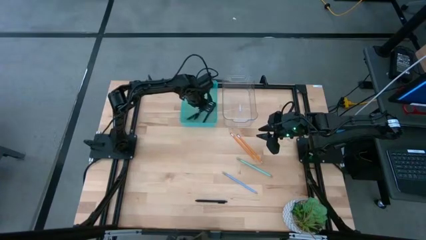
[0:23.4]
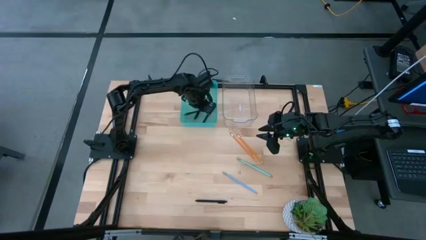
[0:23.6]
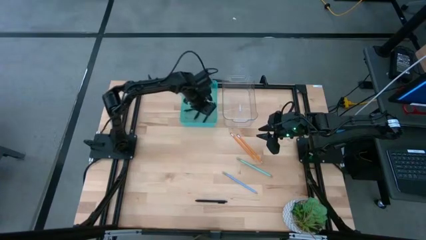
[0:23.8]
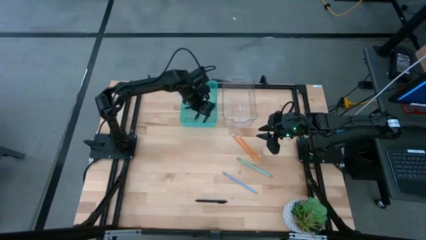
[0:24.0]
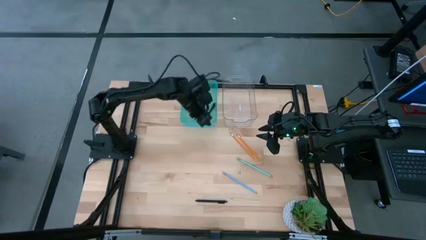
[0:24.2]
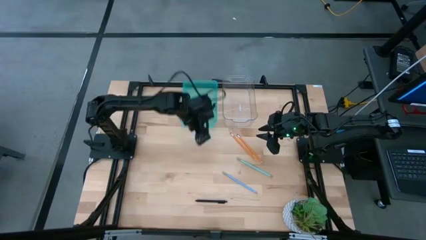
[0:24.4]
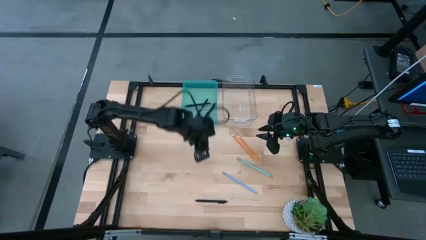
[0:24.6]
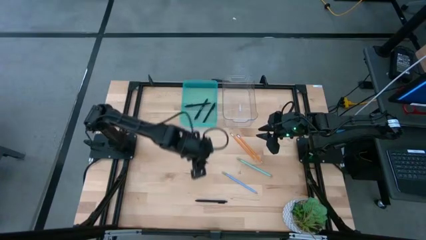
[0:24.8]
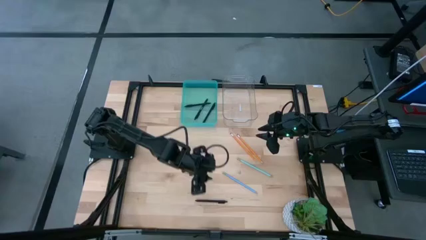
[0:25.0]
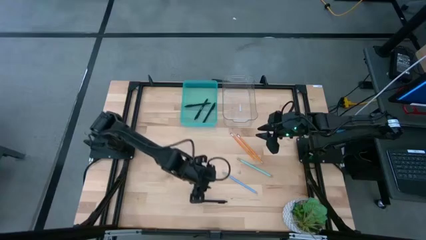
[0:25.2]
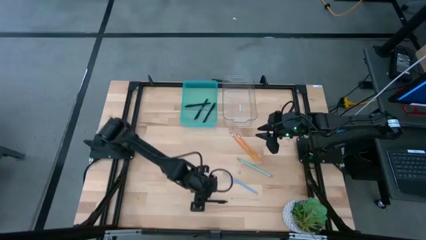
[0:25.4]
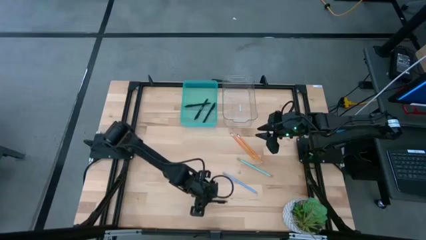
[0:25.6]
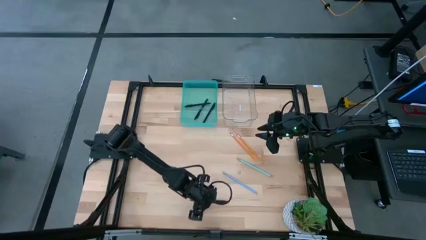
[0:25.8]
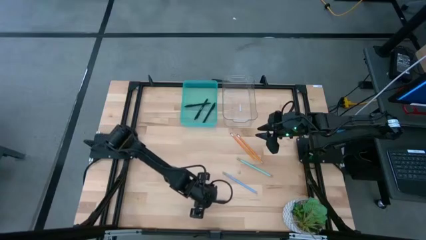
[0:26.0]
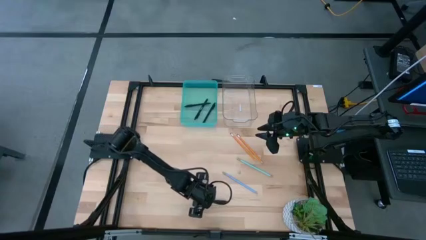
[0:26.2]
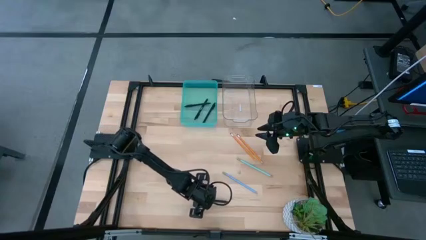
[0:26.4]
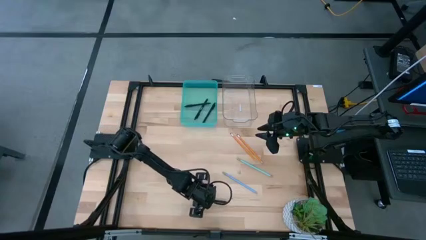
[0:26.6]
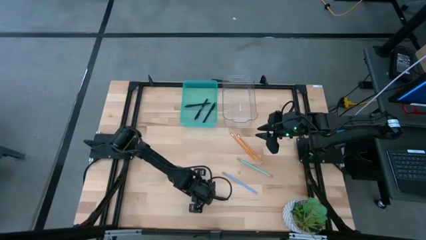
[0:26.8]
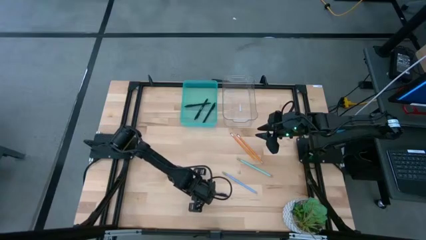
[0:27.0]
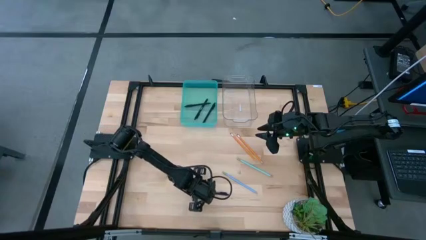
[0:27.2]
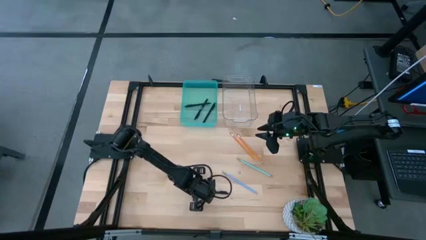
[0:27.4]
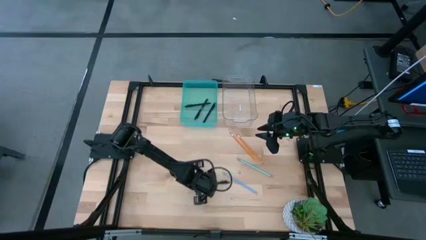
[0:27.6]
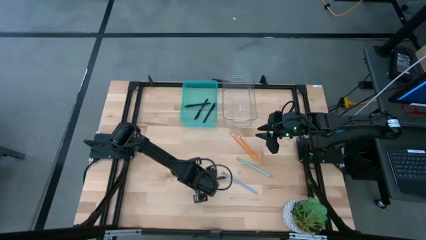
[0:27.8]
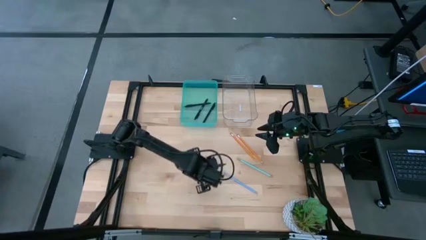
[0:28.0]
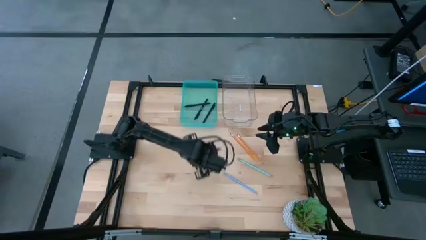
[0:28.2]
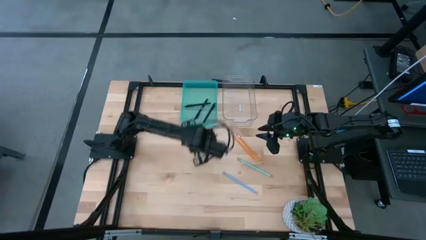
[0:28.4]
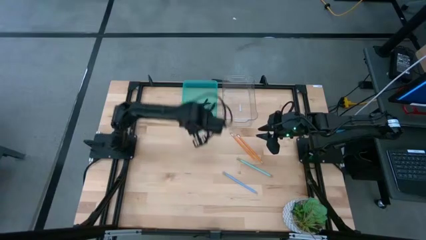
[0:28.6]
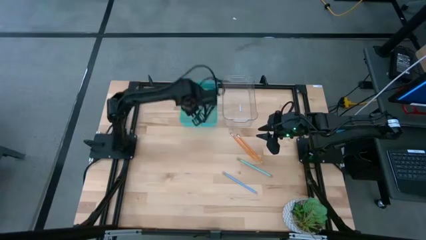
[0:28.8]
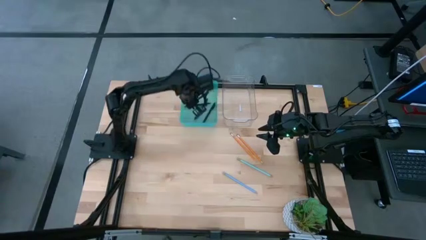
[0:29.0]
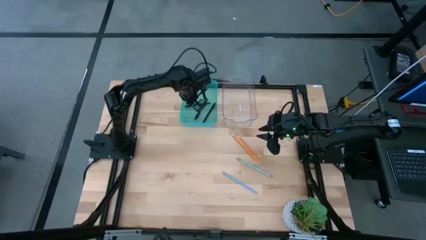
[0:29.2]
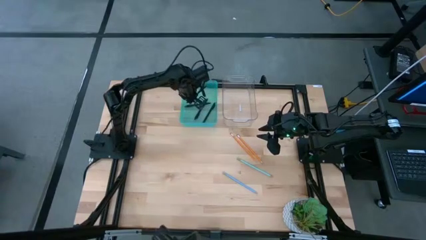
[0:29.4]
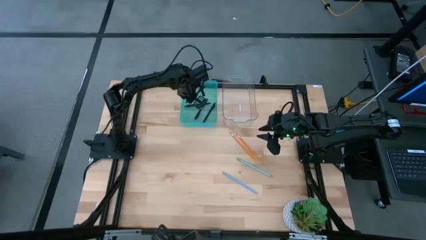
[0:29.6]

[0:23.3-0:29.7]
Task: Sort pens & pencils
Put the black pen into the light blue bin

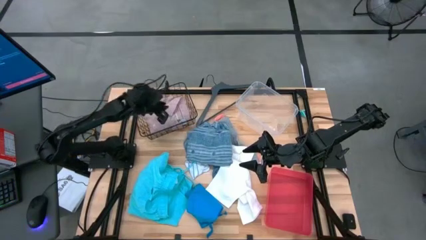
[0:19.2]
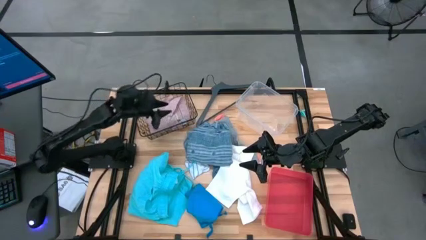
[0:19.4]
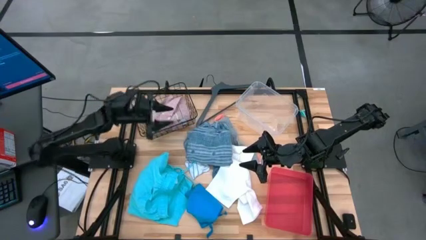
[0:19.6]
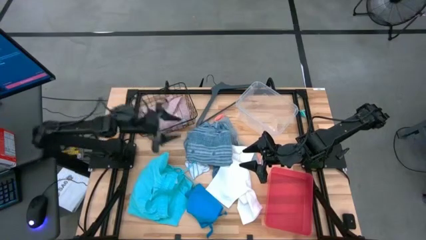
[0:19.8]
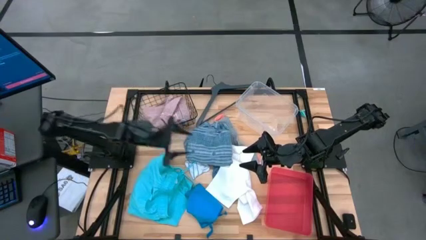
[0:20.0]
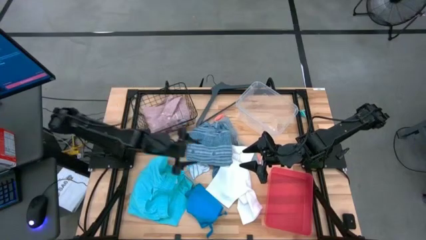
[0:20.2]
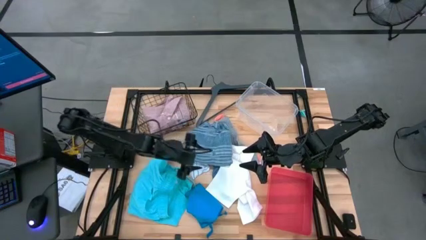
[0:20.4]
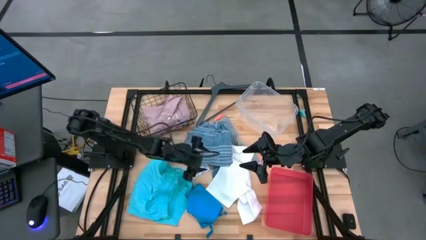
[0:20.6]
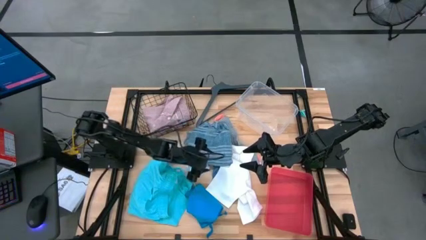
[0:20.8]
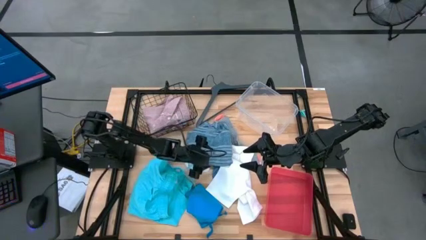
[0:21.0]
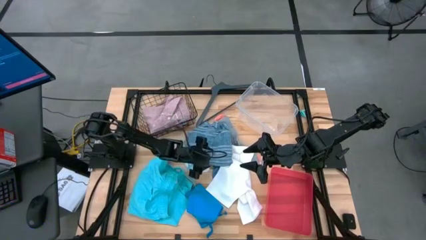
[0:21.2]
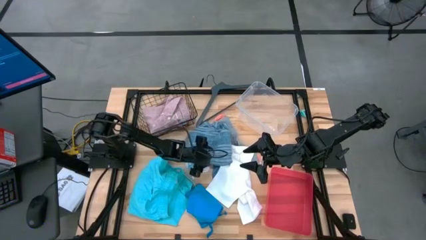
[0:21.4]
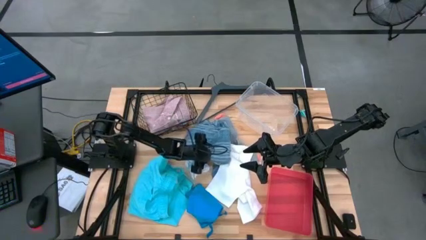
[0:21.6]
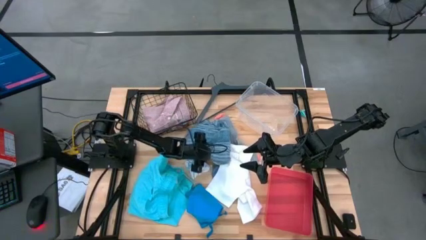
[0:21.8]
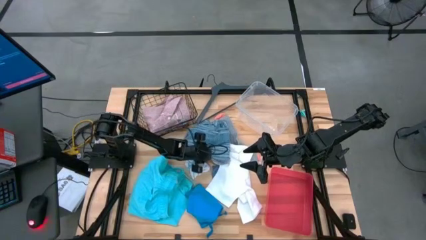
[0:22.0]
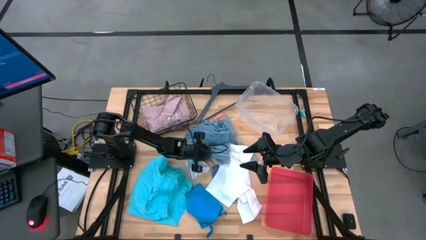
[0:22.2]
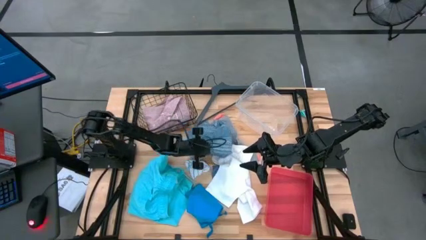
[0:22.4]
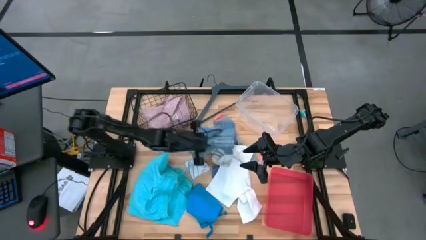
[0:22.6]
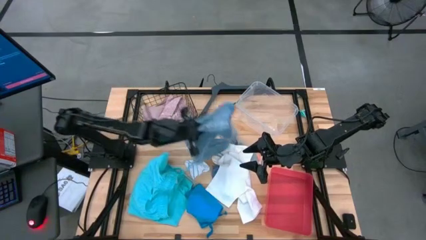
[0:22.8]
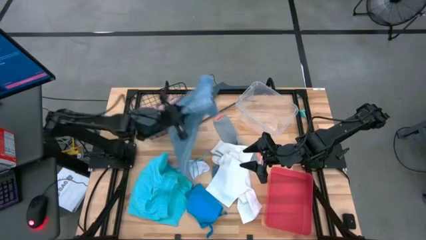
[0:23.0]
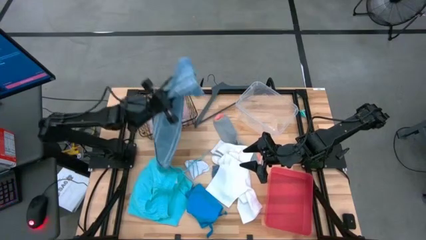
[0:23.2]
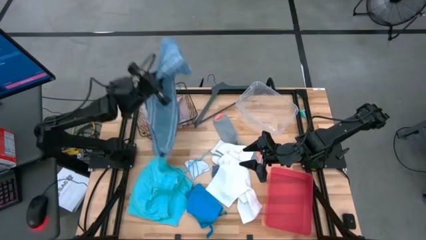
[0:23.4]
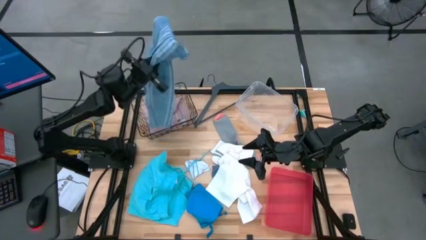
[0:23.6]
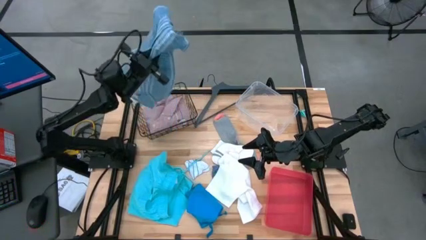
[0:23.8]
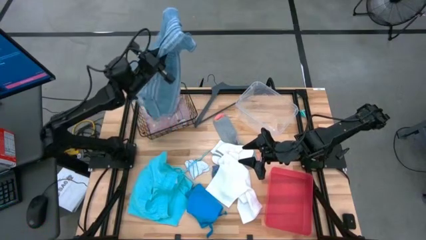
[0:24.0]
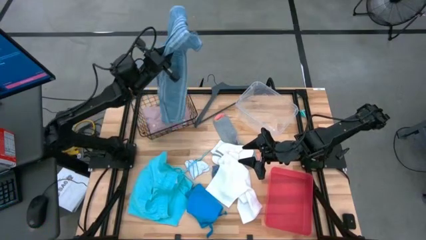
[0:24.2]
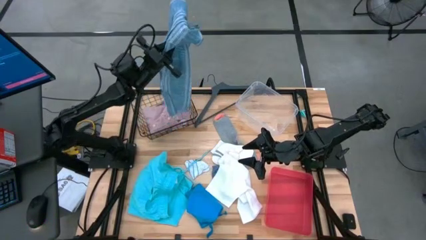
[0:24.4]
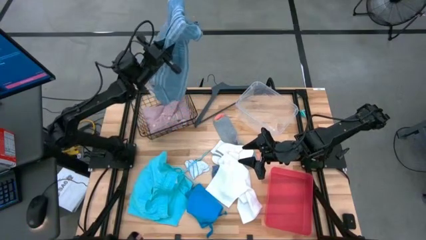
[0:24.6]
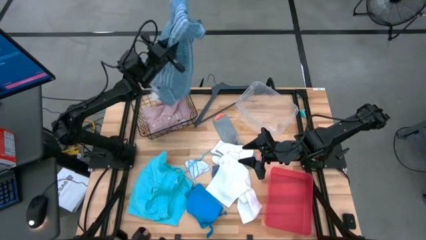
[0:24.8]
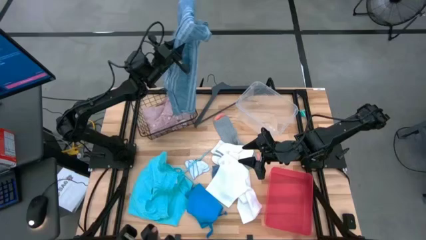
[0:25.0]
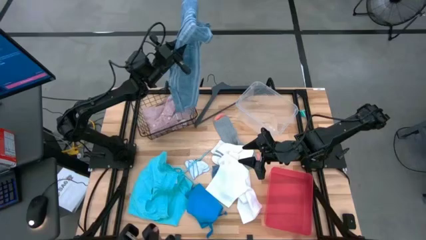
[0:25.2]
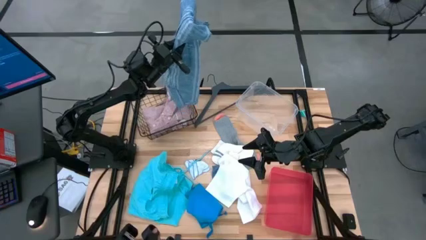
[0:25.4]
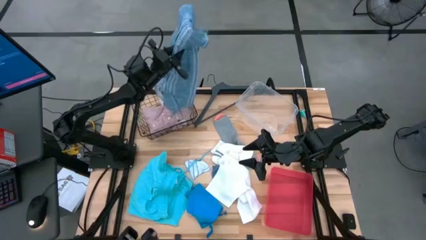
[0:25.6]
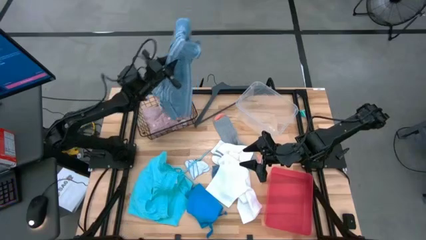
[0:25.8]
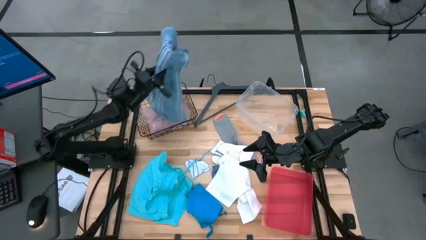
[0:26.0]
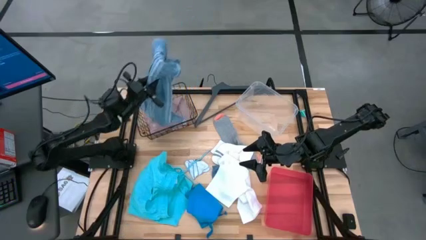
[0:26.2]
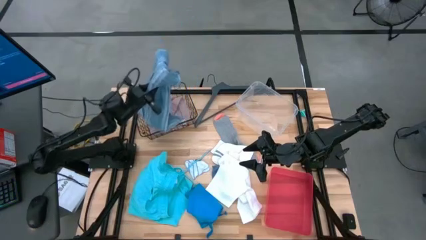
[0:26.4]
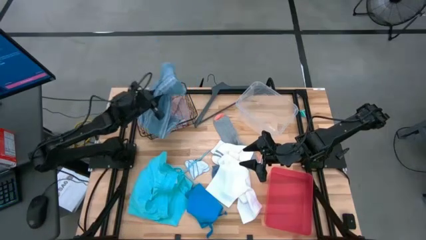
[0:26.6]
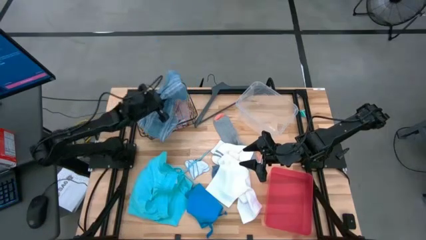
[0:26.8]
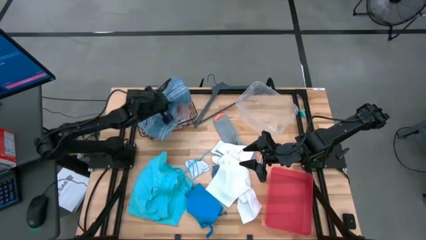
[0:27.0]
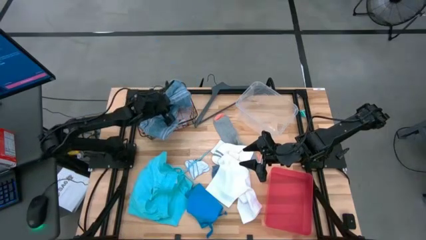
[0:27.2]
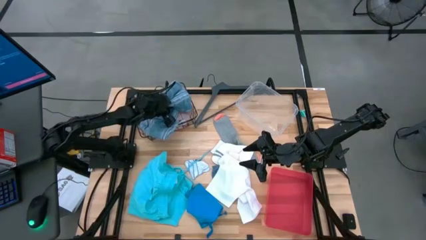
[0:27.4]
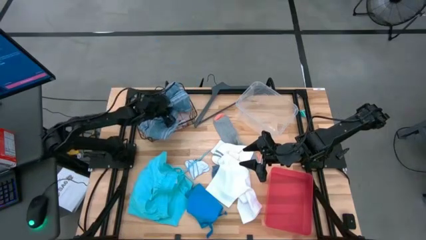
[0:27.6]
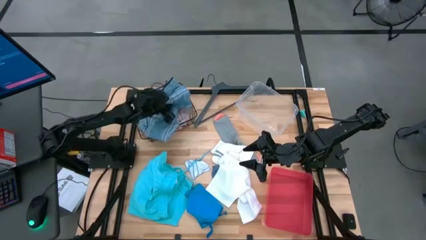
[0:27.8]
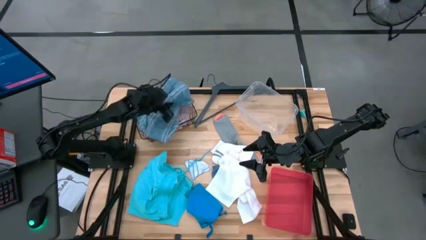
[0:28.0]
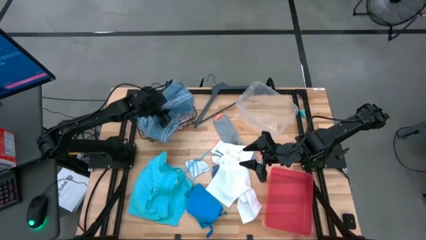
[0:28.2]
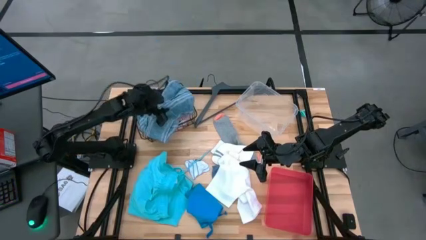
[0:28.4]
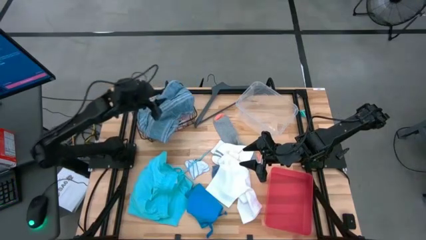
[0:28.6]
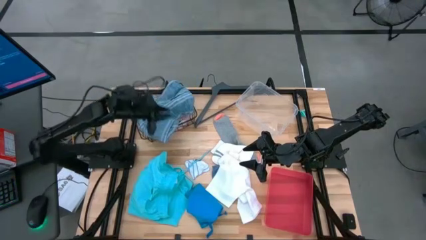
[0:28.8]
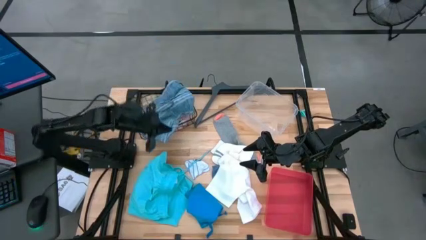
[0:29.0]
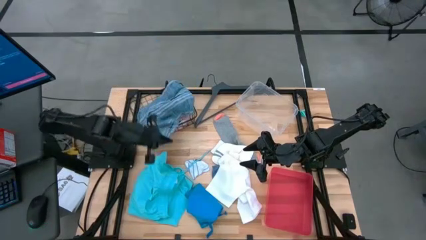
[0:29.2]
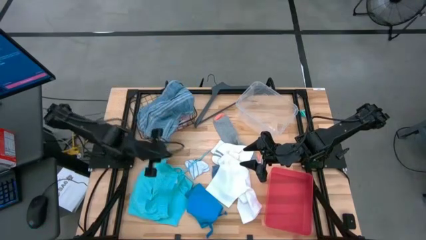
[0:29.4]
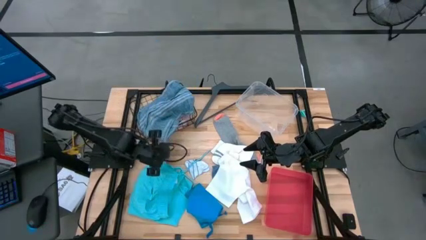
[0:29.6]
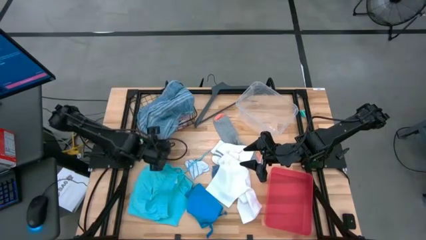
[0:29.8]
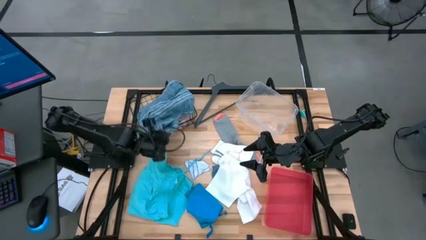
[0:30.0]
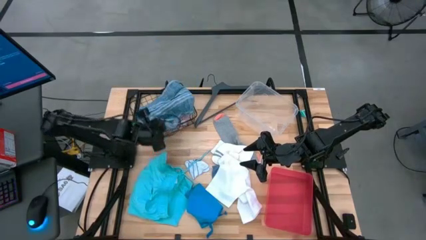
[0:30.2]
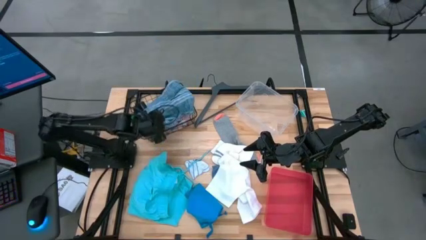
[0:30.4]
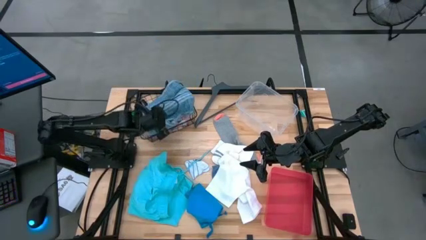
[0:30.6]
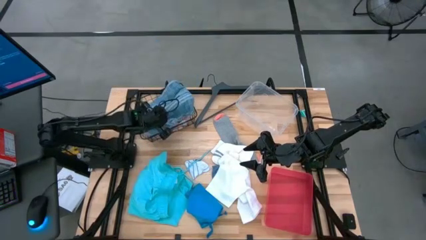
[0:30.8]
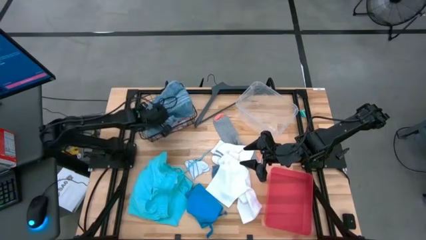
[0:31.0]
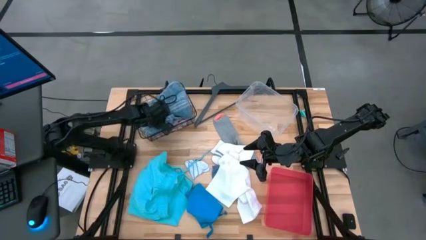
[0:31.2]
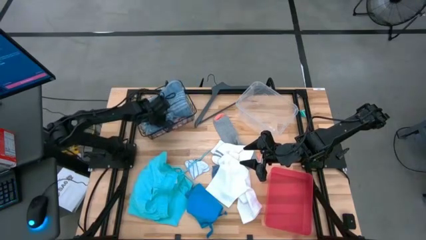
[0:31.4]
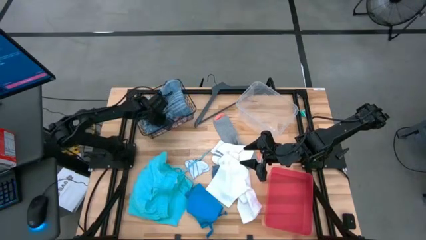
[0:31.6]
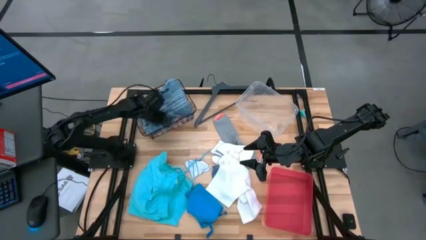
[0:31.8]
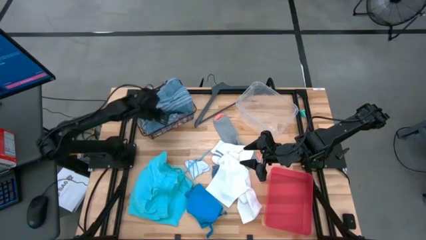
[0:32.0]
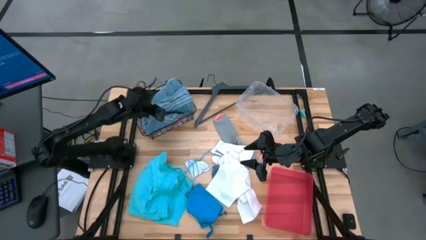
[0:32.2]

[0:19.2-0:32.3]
Task: Pick & Place Cloths
Put the blue polo shirt into the wire basket
